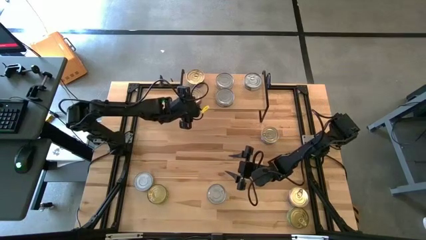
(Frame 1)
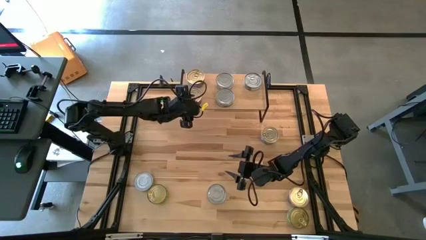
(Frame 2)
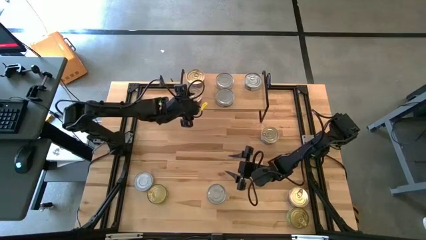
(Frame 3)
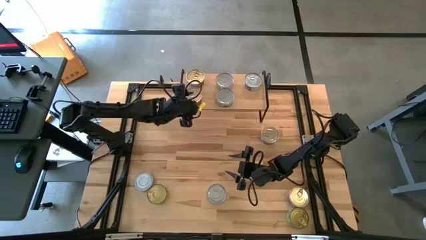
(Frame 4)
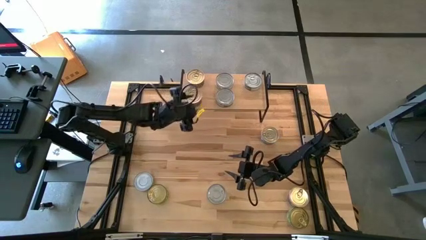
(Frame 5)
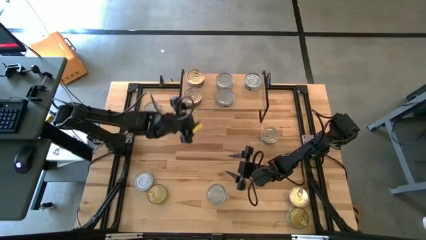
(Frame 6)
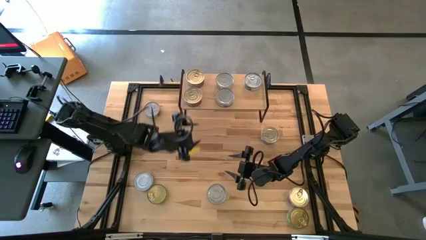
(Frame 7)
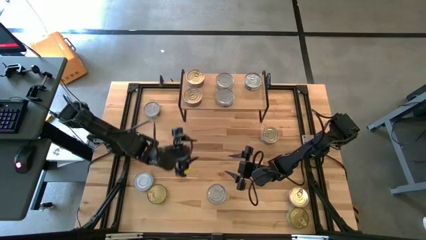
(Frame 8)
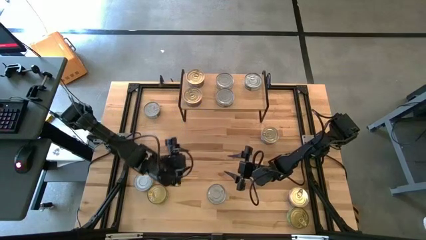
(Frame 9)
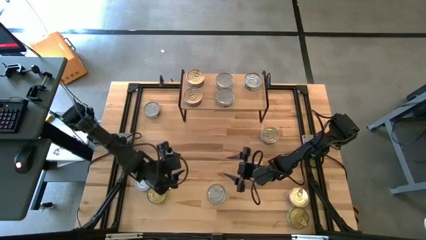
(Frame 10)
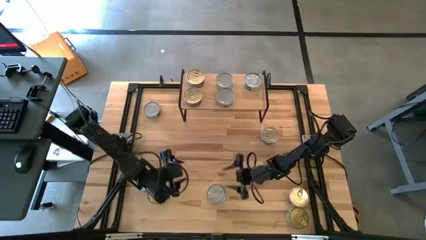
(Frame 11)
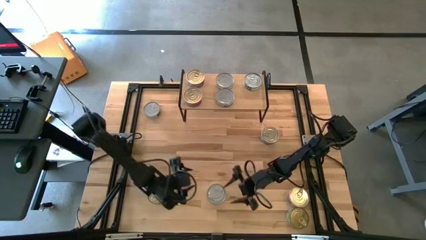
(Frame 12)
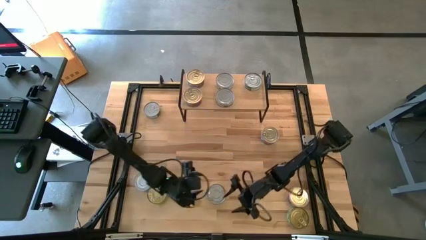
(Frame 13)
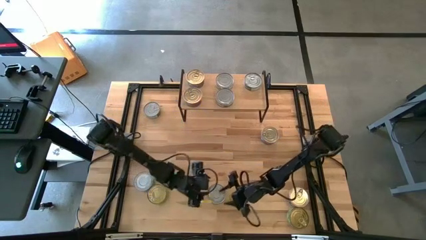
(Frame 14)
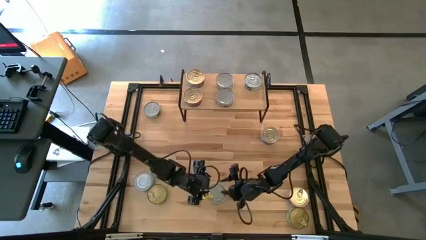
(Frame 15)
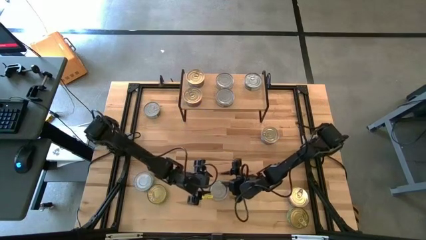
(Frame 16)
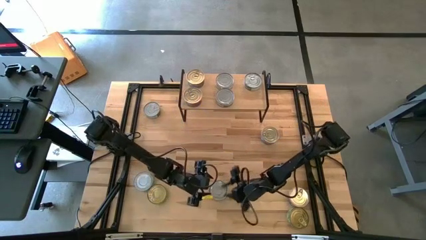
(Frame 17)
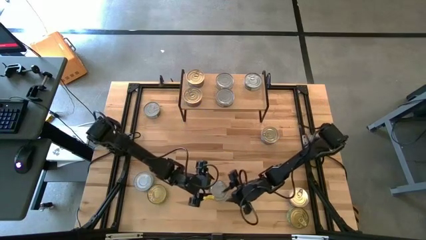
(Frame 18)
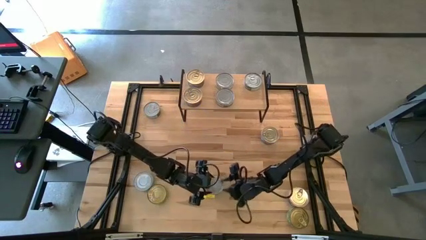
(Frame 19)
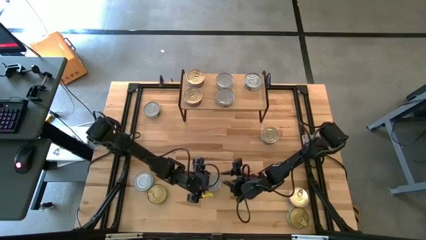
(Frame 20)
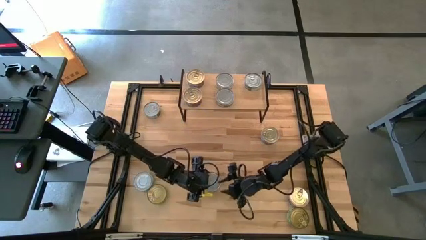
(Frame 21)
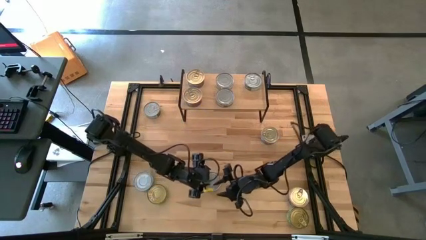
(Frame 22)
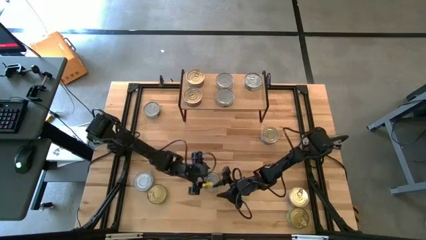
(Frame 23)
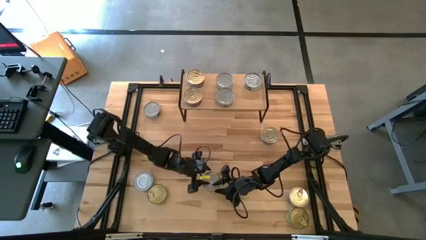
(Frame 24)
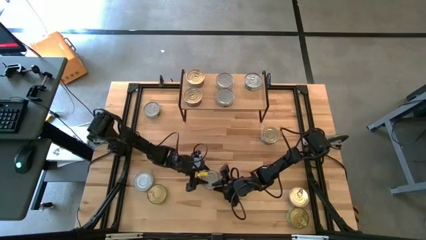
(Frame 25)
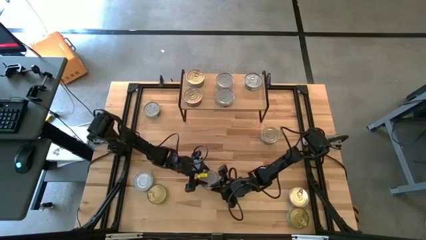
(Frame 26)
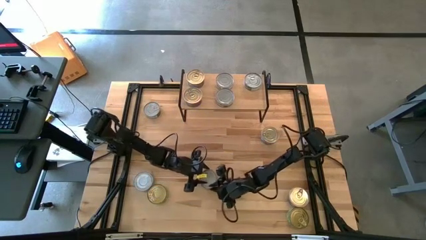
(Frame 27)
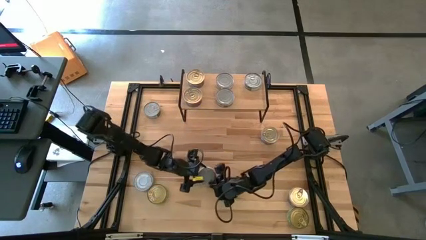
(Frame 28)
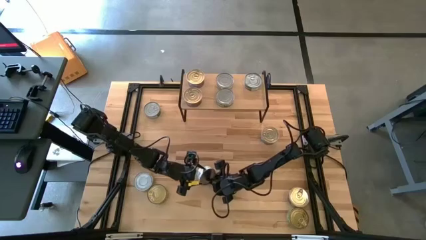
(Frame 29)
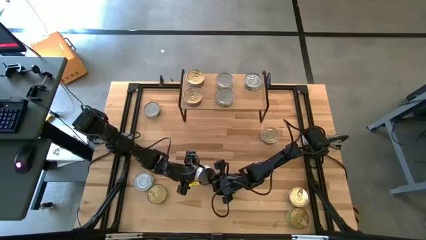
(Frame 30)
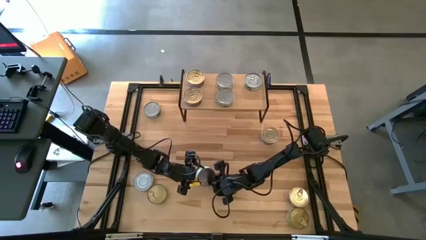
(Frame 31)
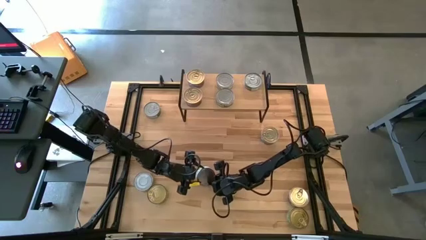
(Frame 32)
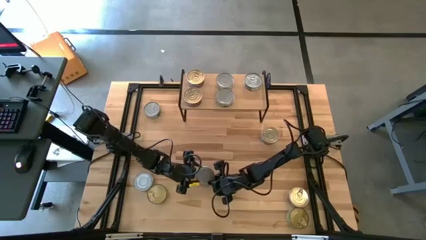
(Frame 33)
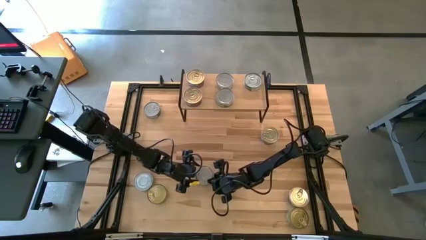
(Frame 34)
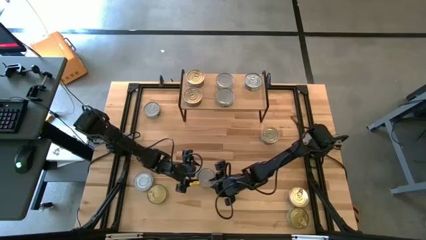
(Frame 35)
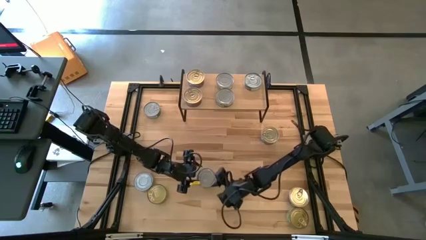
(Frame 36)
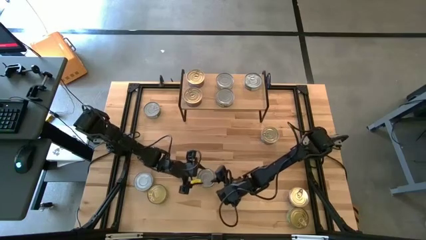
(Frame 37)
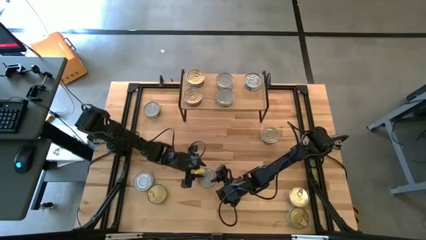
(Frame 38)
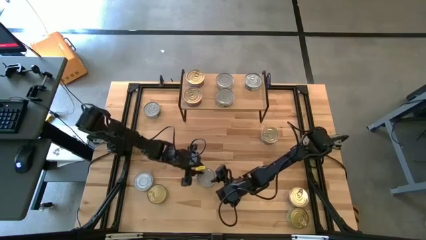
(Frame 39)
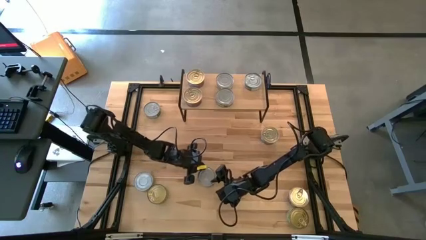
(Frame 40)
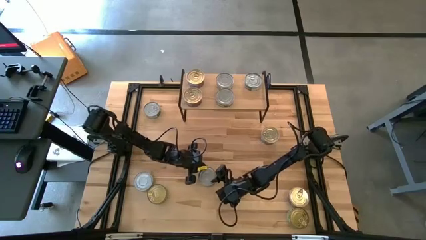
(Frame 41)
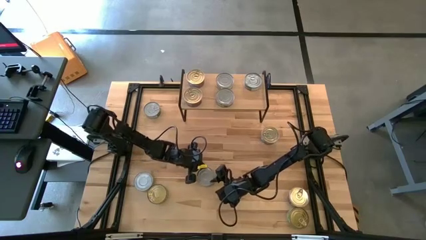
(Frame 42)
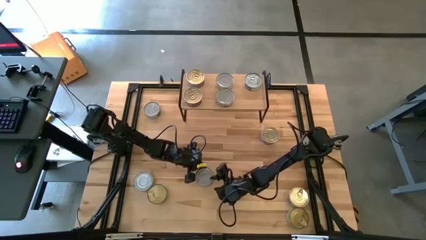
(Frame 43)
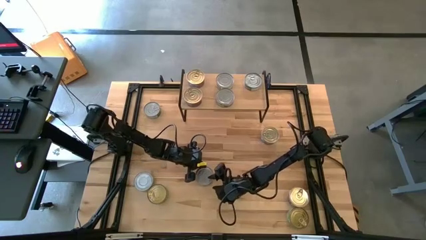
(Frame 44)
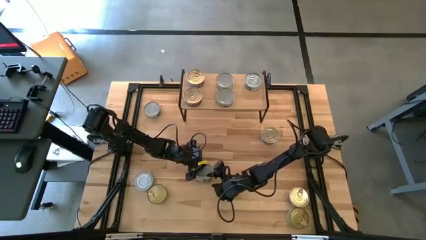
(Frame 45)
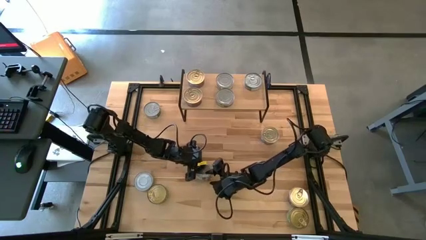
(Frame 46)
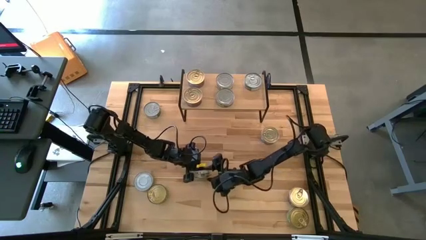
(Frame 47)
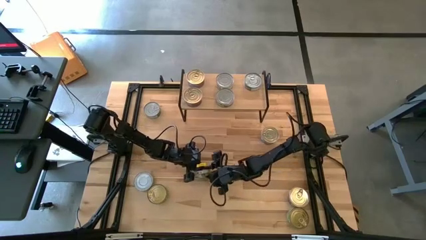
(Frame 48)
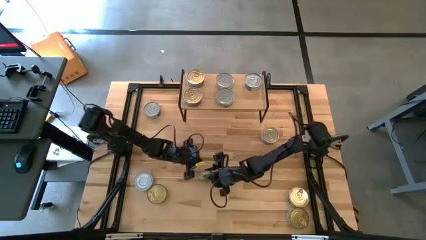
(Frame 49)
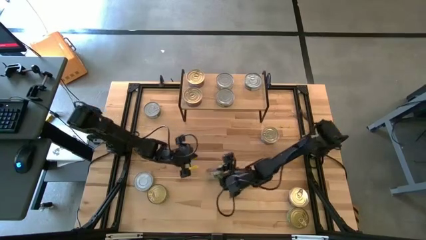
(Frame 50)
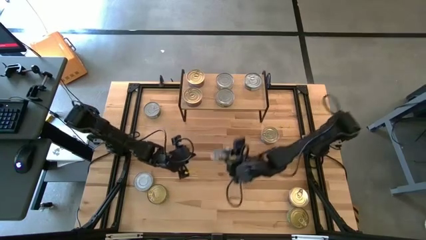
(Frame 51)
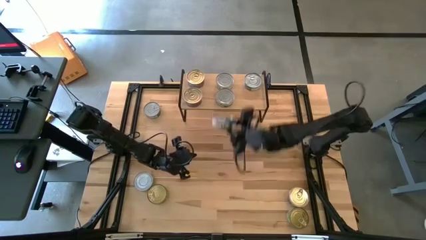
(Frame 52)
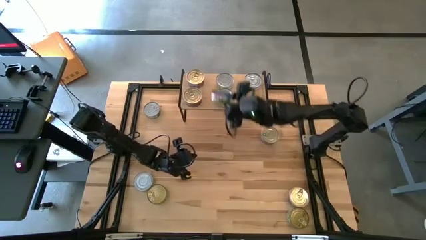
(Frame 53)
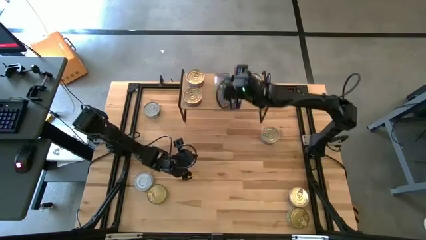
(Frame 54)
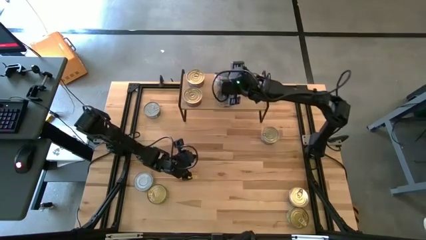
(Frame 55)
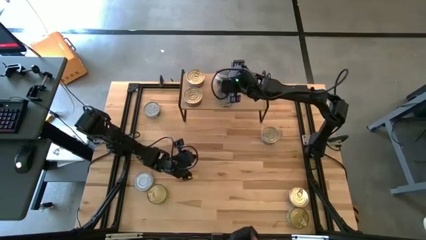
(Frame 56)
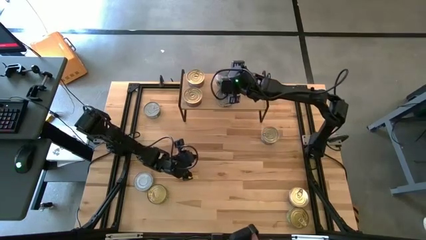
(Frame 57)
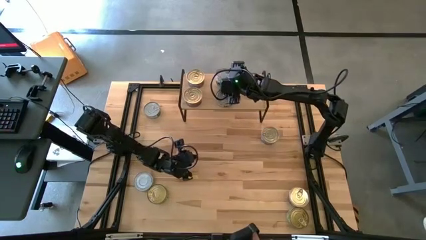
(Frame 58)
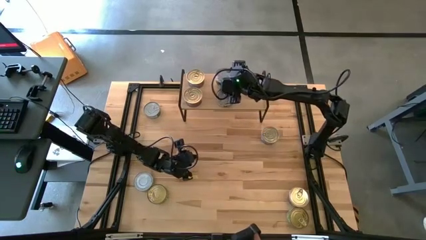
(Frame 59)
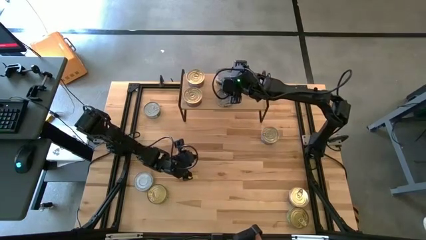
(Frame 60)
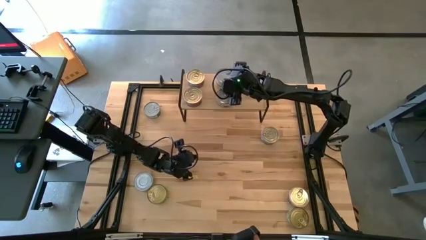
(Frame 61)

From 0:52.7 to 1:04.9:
Task: Stack canned seafood by type on shelf
Stack the green white tuna can on top of the other green white tuna can on the shelf

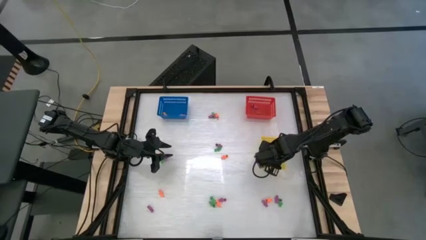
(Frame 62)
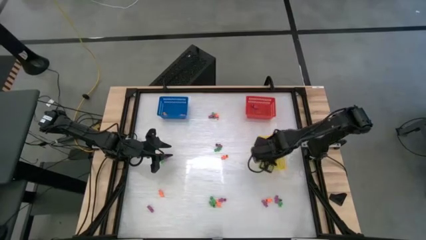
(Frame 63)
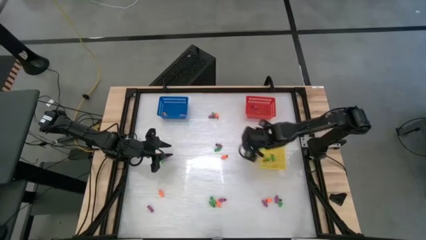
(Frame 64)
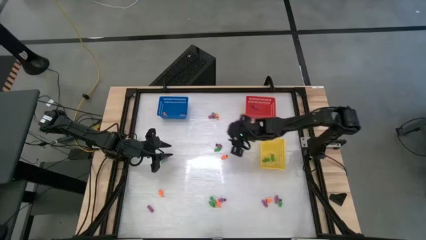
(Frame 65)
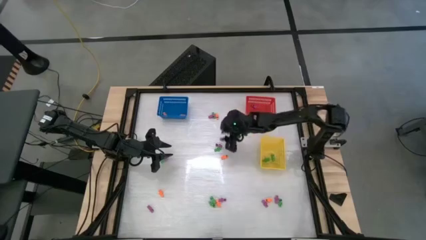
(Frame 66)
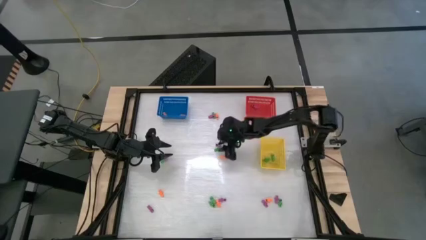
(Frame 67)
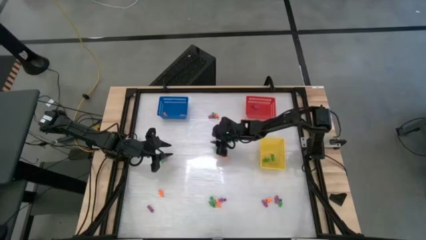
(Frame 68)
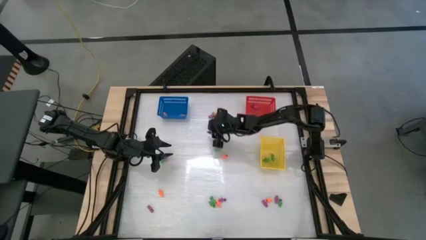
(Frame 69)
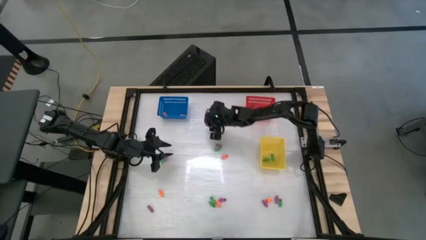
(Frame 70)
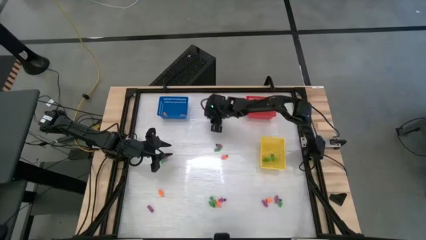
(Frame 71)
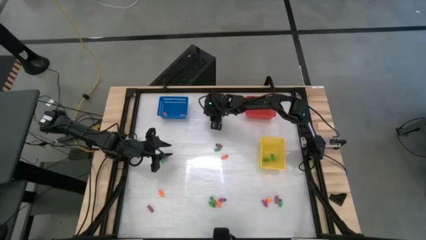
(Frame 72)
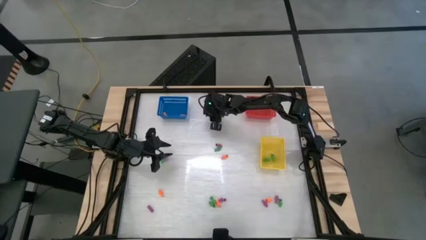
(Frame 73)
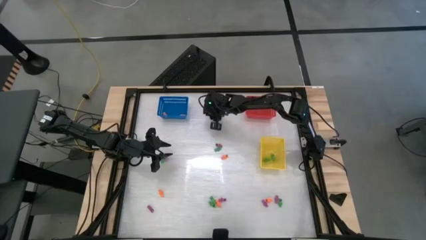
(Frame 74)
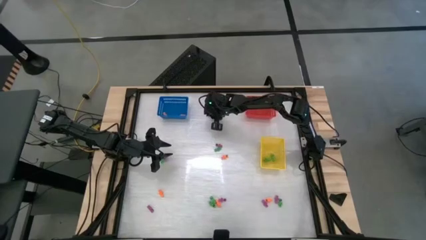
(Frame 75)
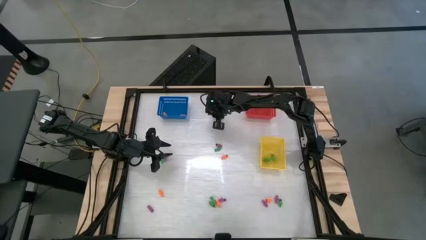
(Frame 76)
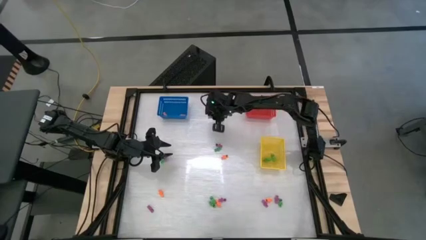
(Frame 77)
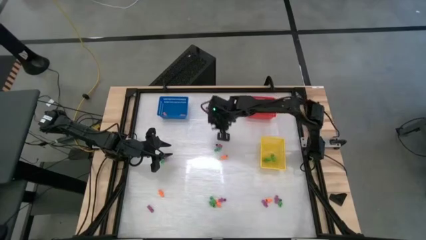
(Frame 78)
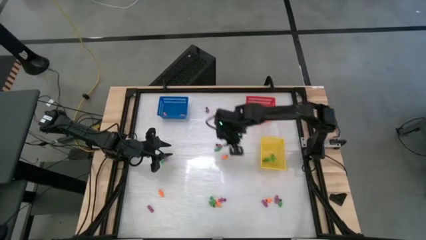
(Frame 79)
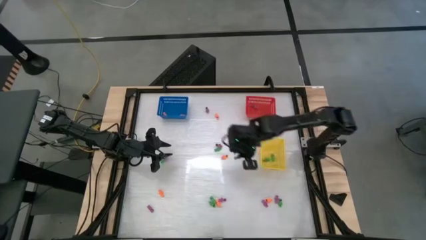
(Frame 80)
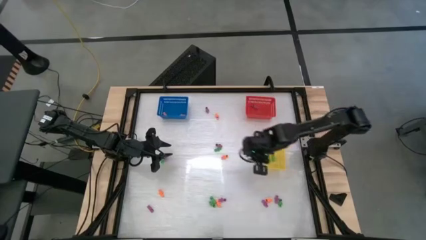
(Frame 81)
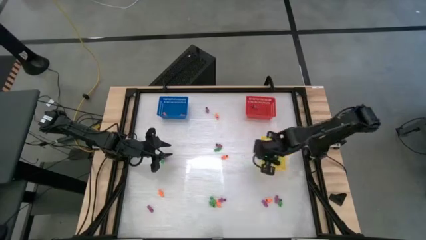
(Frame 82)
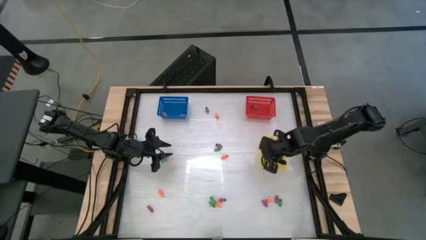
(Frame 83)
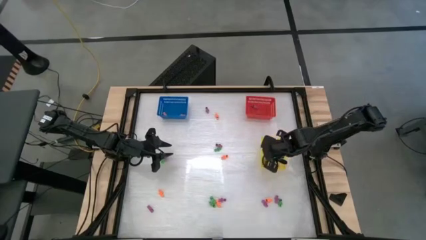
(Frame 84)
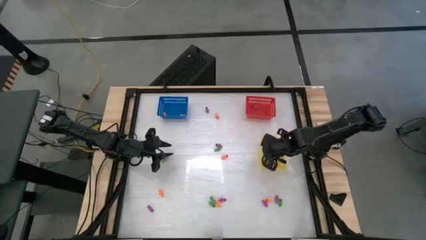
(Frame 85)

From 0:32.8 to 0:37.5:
Task: Sort Halloween decoration
Put the green skeleton toy into the yellow bin
